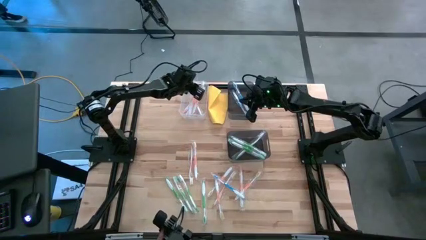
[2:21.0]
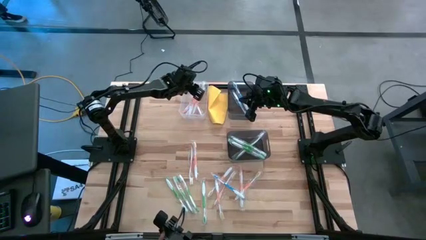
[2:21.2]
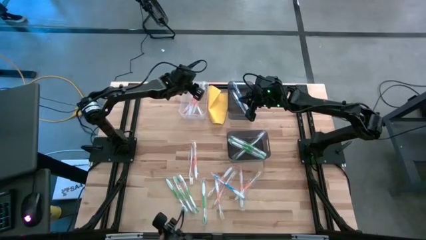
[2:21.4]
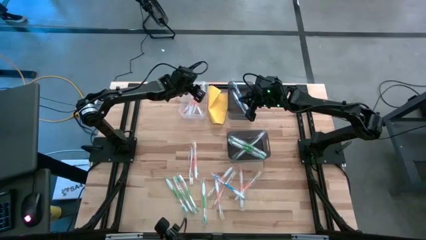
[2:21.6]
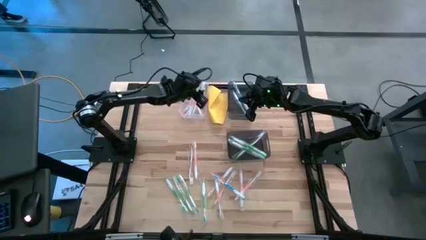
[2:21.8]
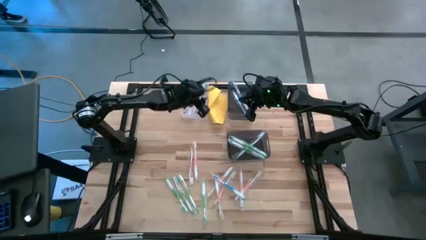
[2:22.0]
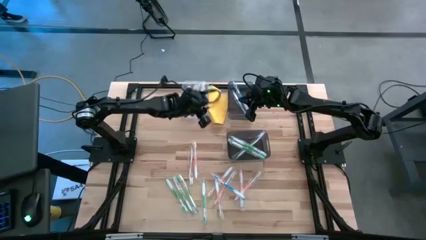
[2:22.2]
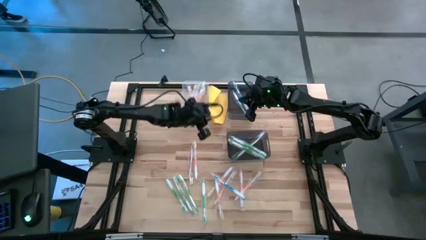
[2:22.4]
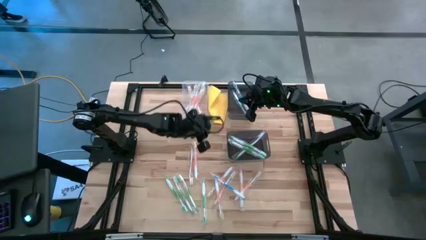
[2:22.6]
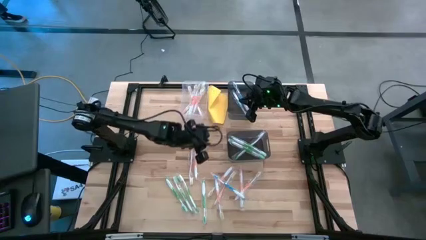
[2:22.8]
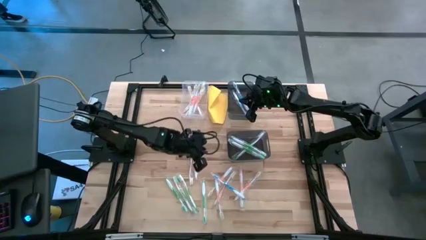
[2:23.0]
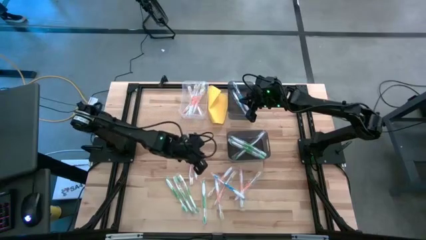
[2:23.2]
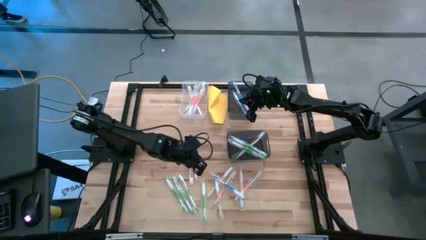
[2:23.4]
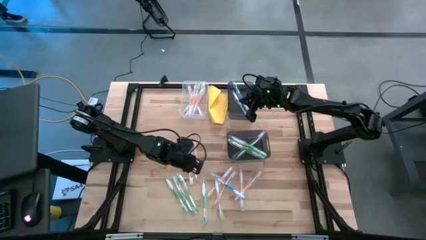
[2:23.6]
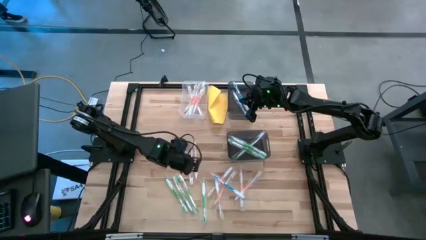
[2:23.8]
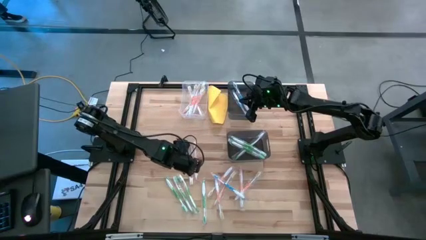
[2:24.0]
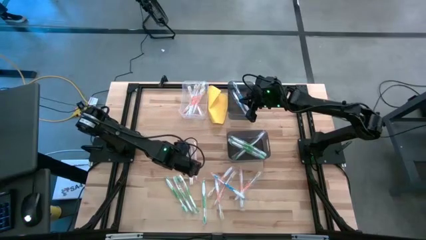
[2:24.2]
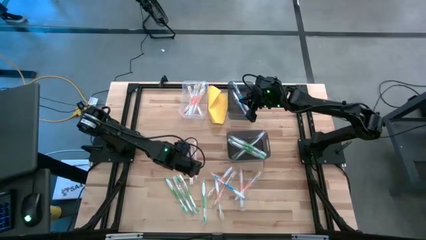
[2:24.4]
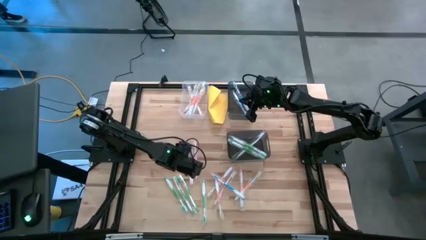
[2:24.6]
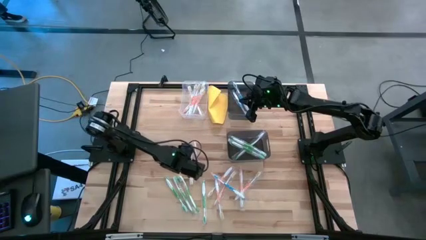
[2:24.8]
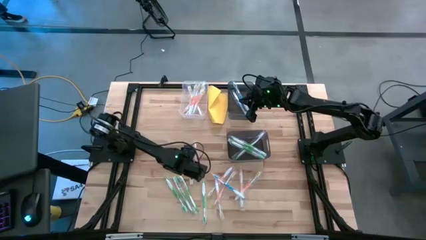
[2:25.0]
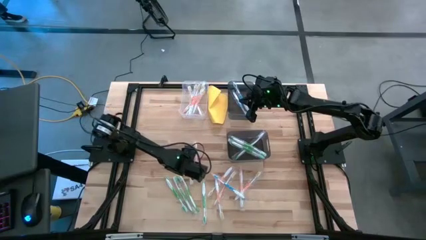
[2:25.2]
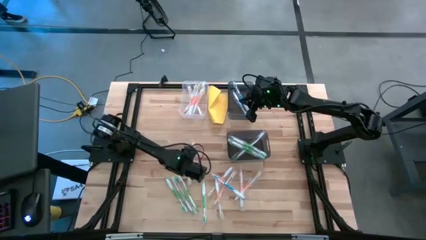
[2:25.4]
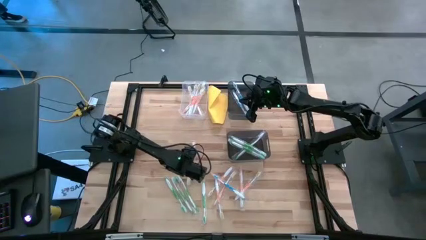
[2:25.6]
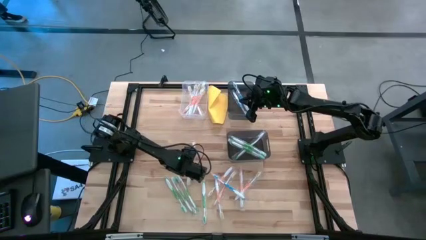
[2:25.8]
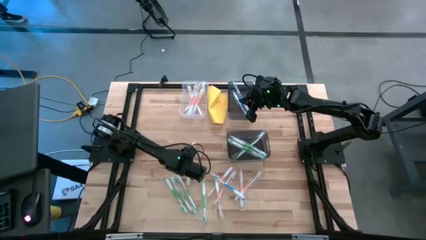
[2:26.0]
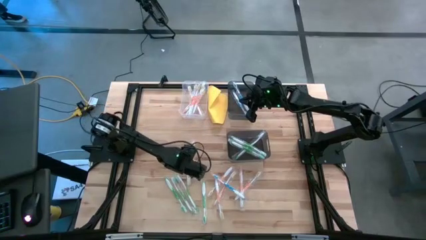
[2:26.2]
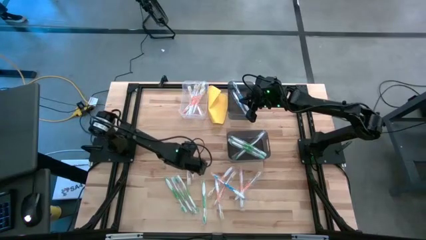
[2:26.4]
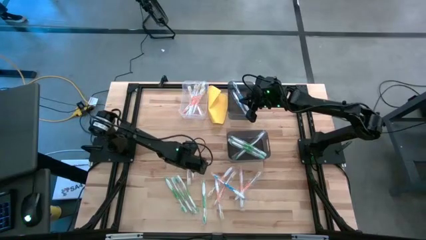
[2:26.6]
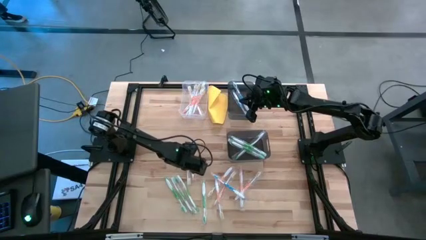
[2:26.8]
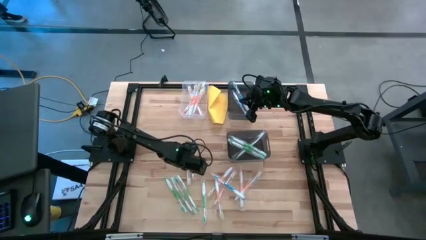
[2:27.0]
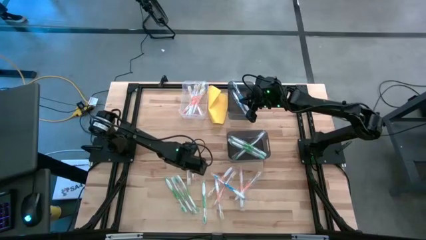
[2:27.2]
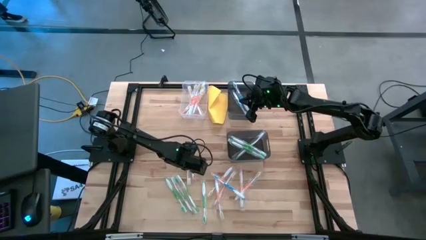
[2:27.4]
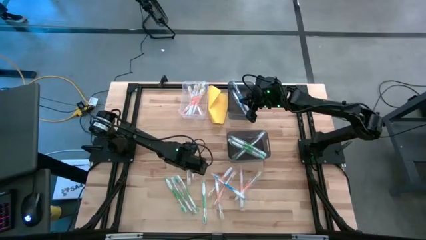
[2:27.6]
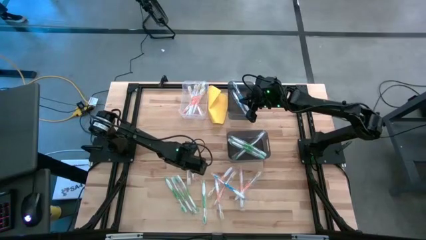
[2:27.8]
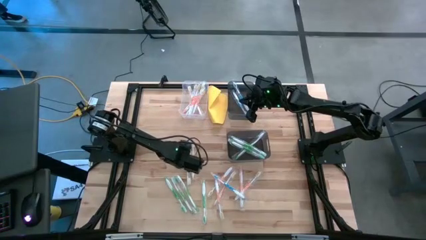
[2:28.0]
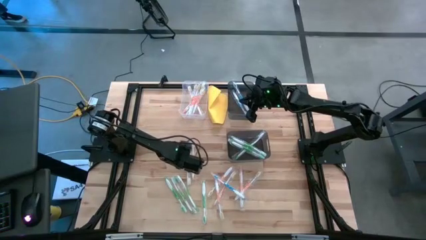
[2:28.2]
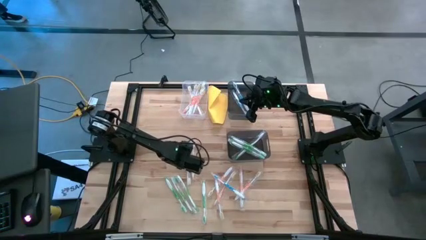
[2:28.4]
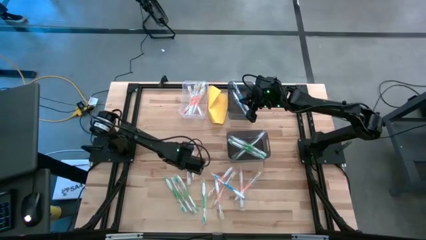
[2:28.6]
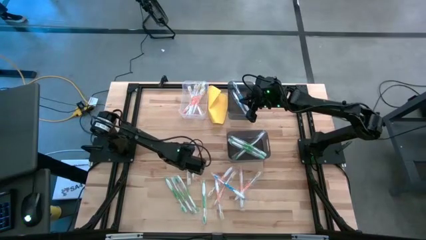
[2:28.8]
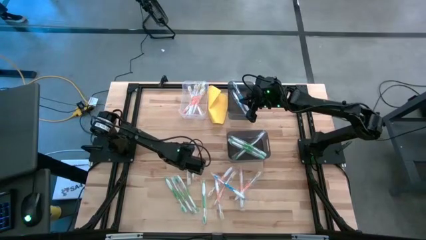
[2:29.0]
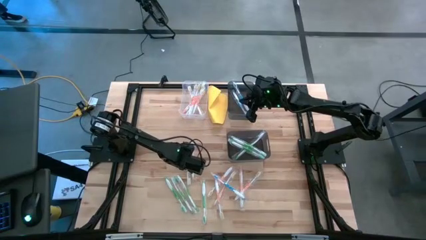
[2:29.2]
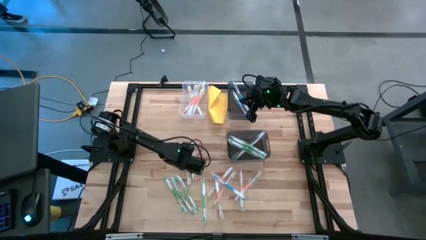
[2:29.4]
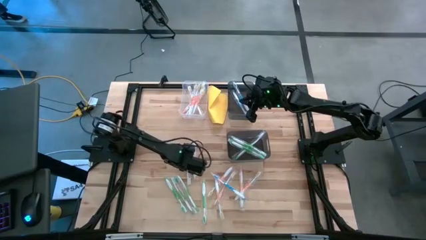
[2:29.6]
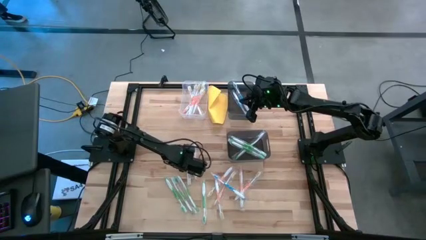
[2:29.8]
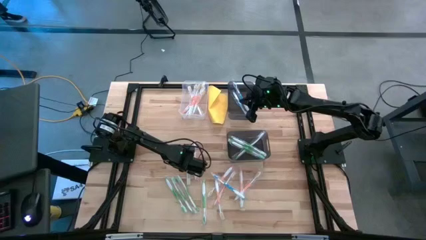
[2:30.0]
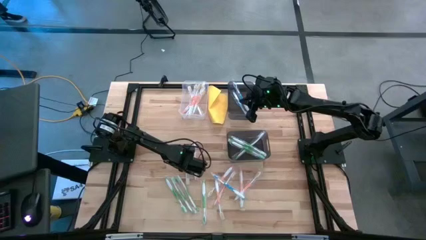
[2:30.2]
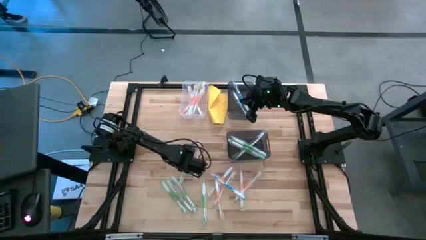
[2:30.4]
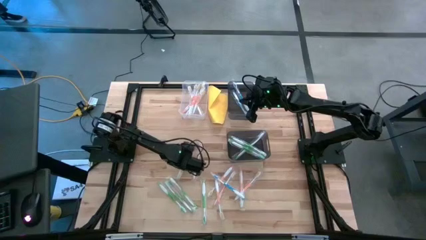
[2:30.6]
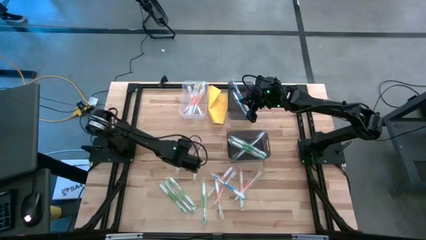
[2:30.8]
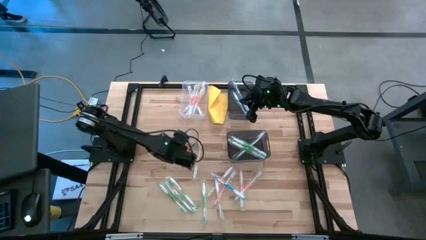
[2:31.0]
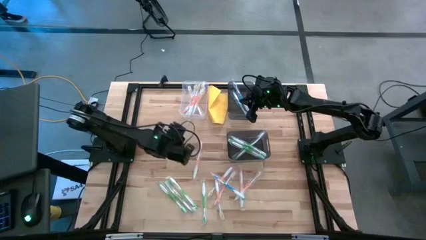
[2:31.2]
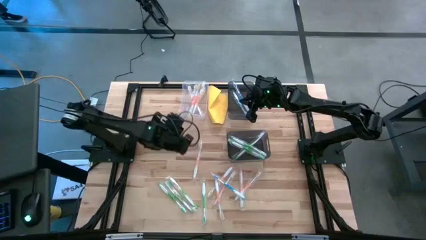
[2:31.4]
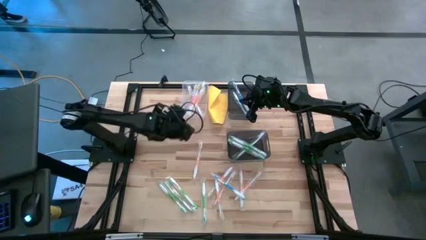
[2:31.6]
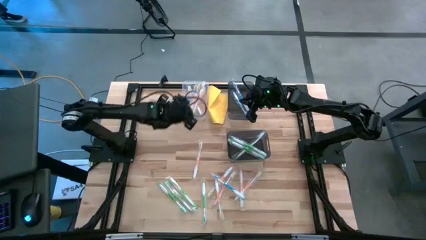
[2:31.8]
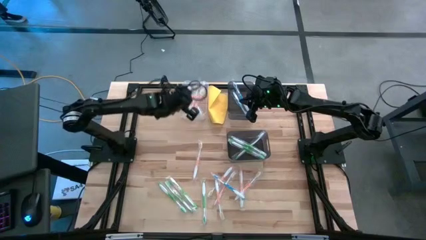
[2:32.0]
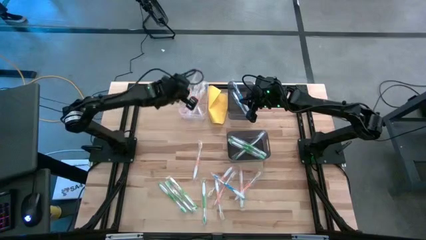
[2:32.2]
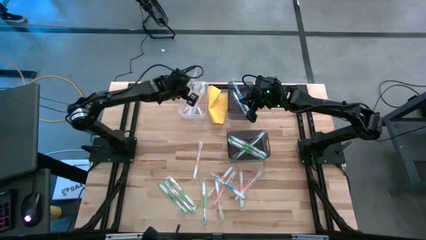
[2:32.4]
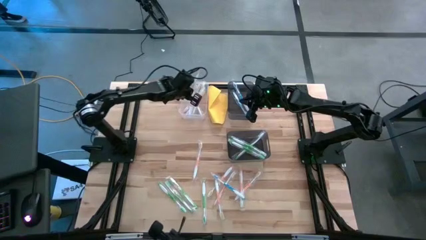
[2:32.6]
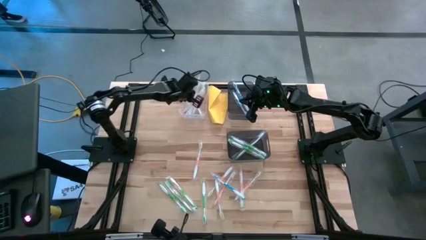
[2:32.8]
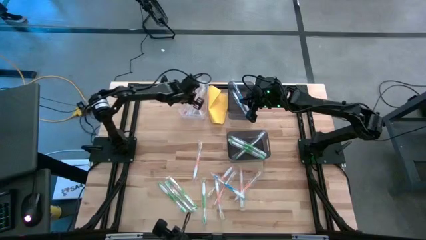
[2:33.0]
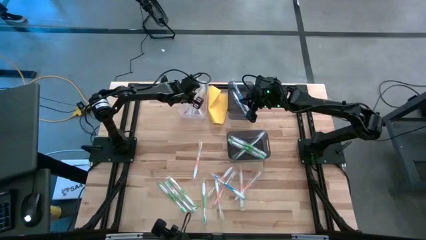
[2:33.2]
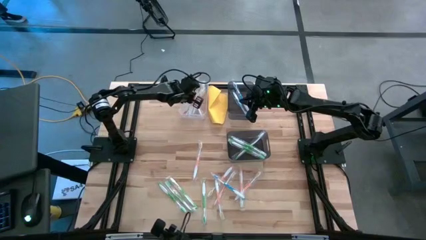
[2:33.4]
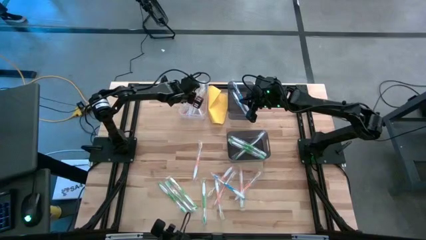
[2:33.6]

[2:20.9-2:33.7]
Task: Pick & Place Toothbrushes
Put the orange toothbrush into the transparent bin

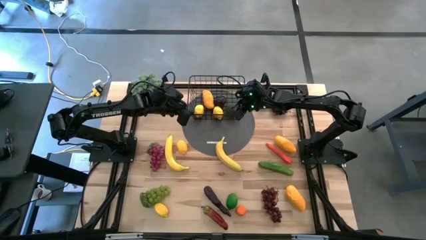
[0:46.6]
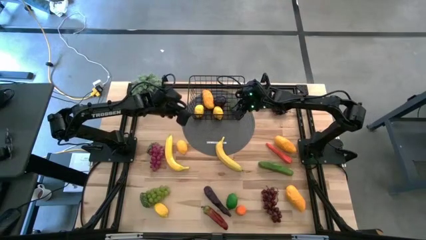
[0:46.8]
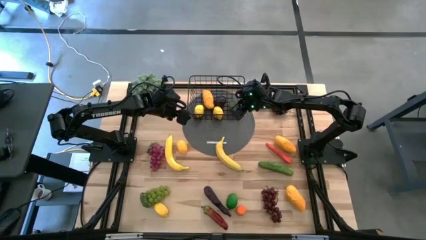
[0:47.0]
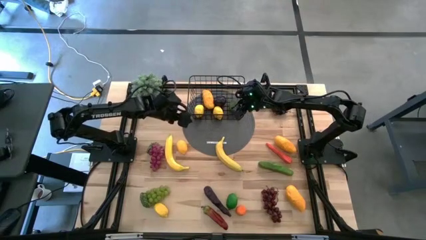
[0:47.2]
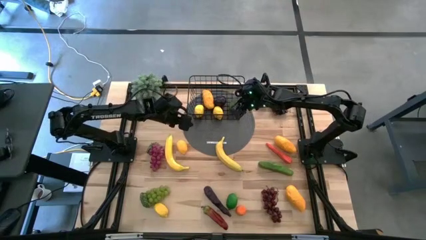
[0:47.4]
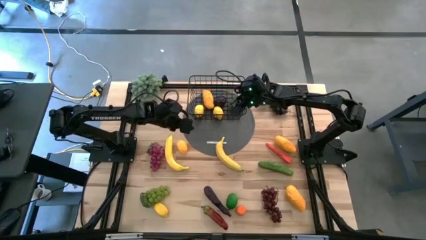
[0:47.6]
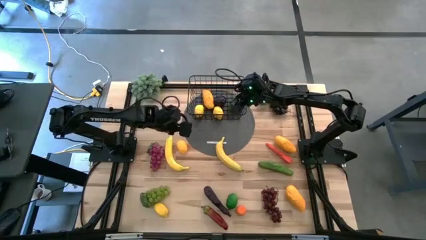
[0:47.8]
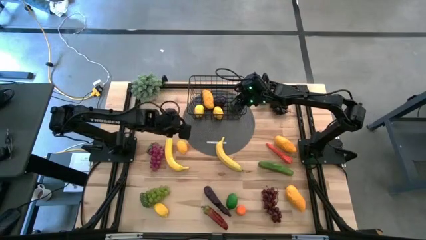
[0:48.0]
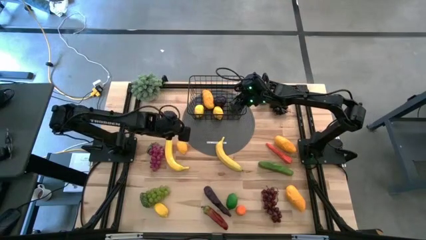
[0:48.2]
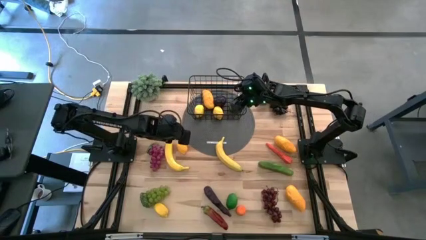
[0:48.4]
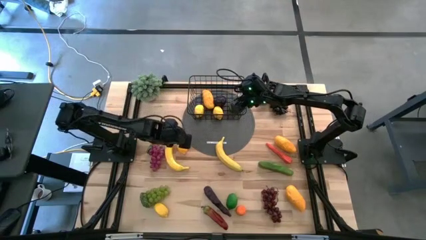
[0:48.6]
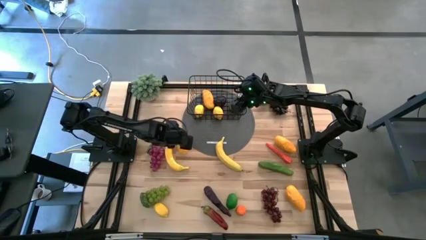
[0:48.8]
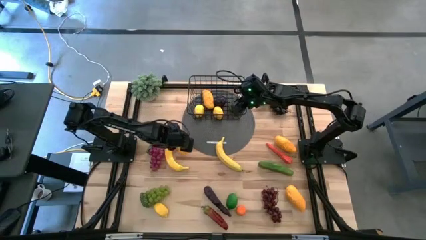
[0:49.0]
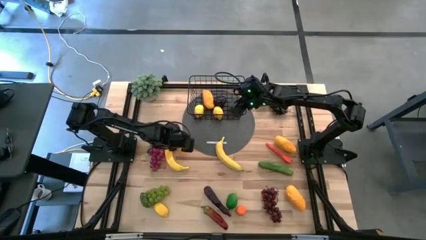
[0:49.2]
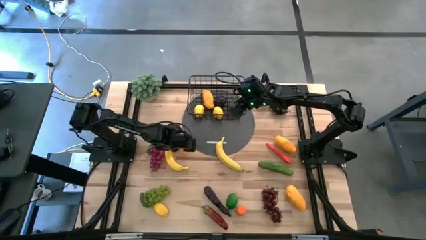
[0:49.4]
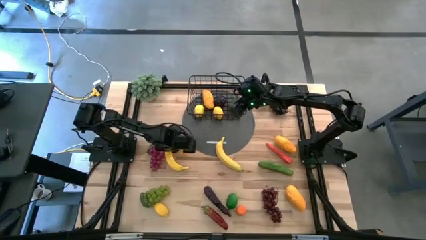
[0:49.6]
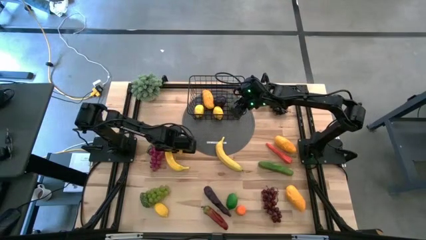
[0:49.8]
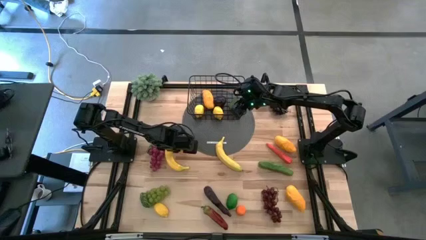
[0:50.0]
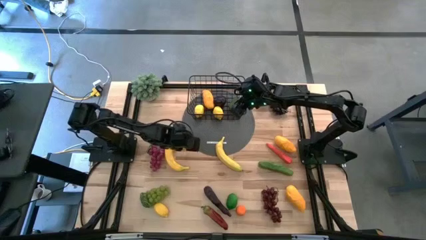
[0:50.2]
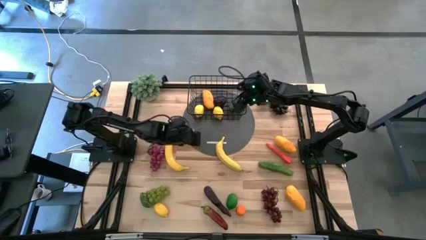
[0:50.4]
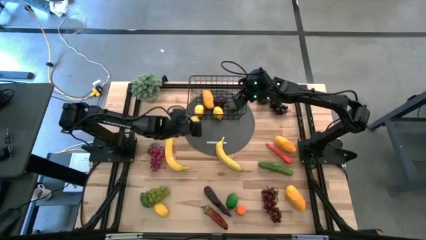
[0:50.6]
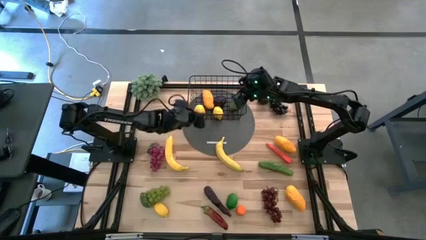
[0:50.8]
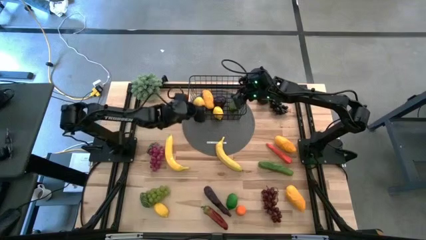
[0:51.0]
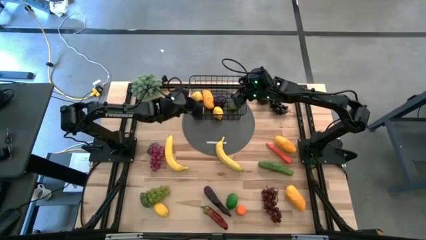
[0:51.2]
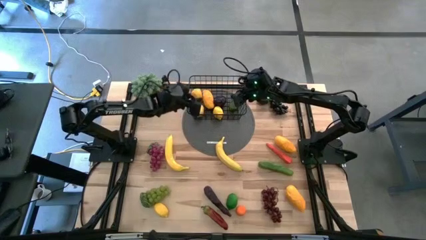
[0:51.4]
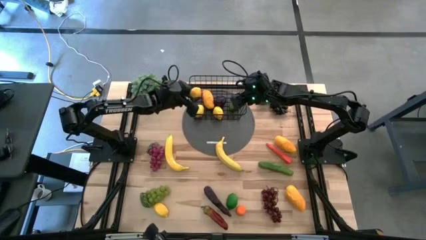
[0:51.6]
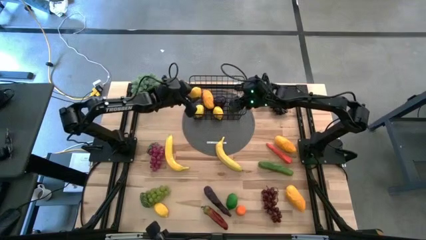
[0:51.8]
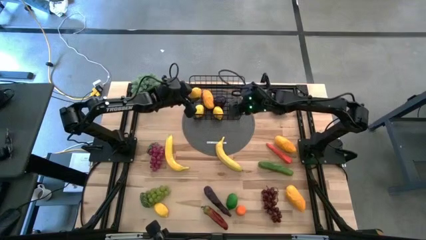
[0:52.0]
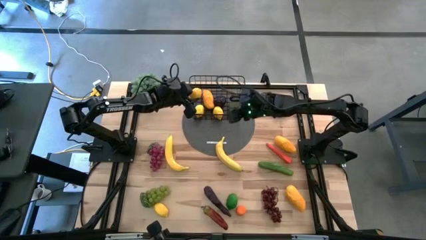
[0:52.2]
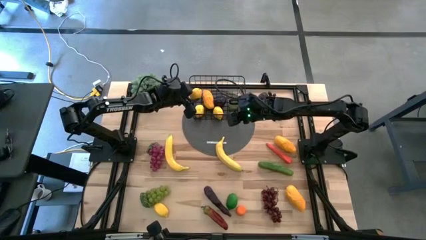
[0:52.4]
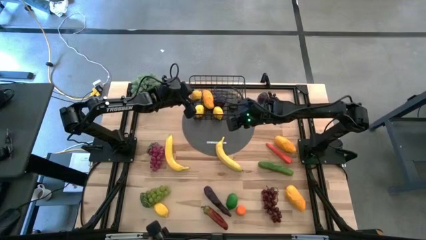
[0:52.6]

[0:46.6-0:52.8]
Task: Build produce basket
Put the yellow lemon into the black wire basket
